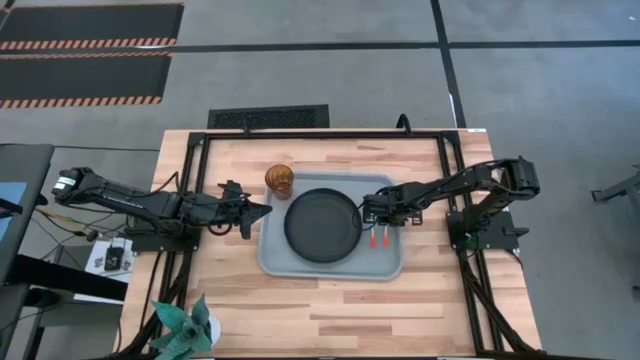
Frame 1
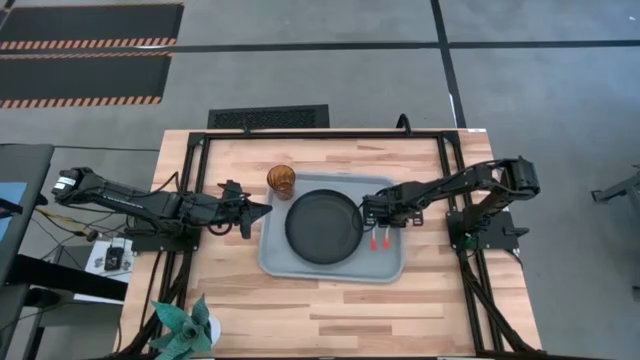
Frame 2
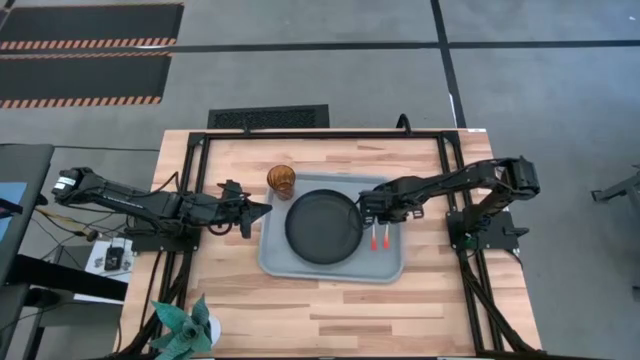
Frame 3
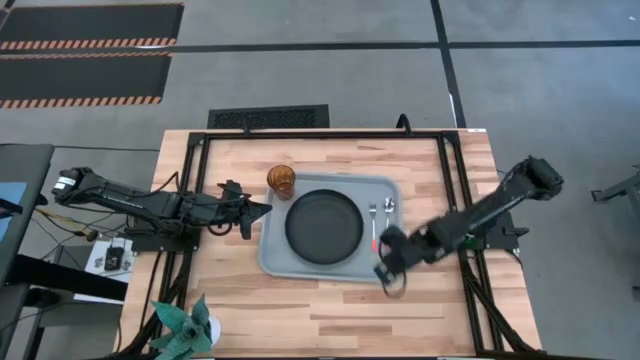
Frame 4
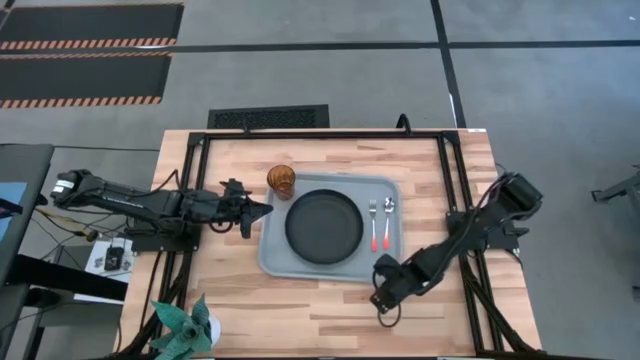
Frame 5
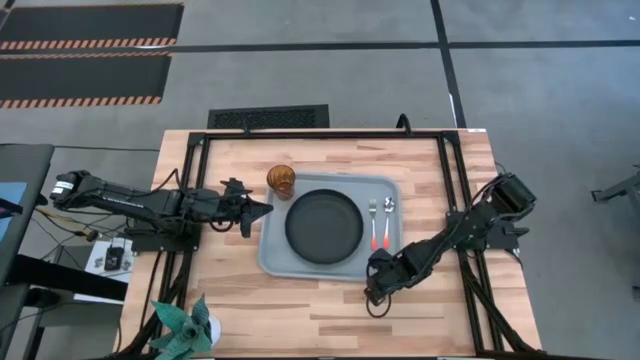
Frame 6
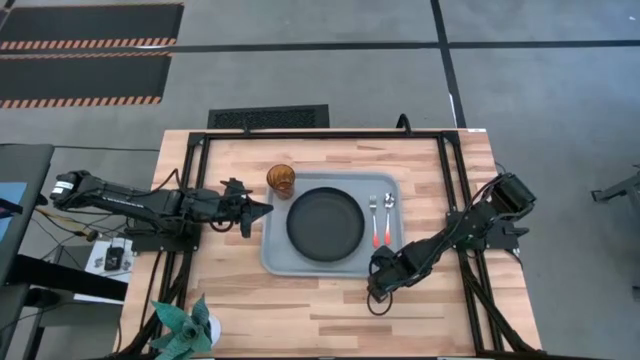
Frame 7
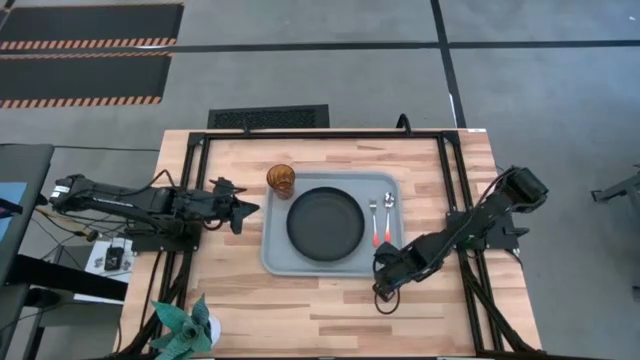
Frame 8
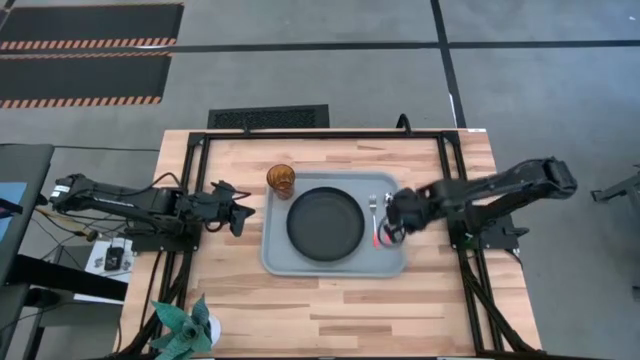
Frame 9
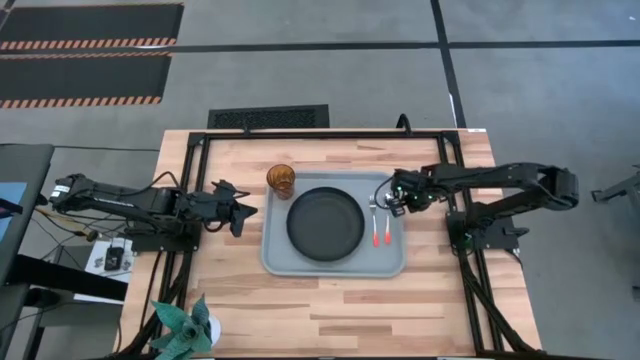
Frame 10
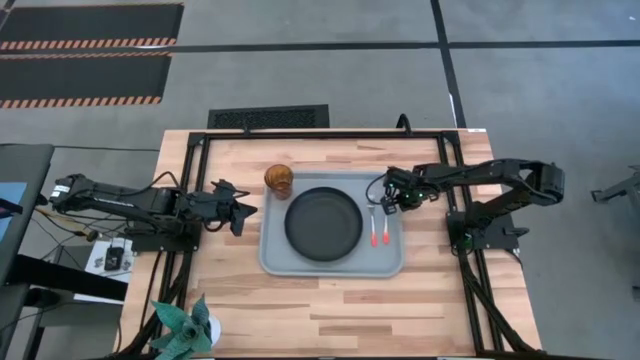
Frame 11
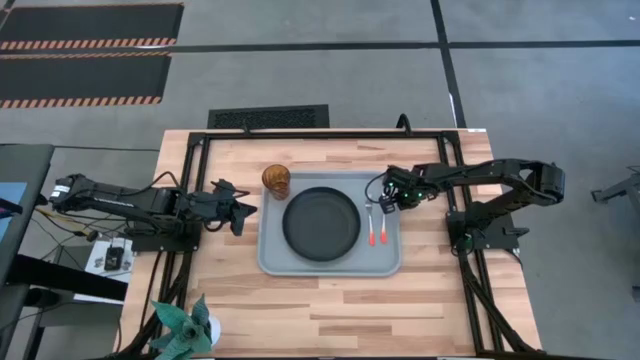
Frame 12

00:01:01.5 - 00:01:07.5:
Task: Pick and place plate/cup/fork/spoon on tray
Adjust the gray tray

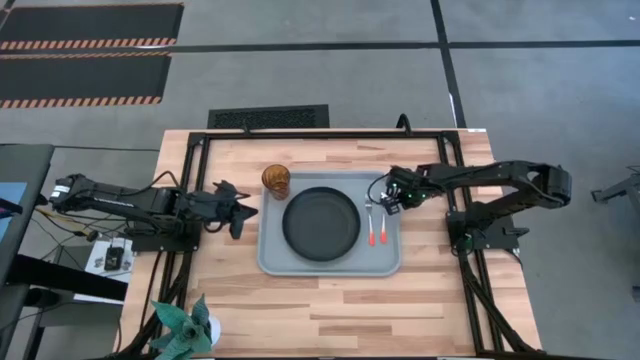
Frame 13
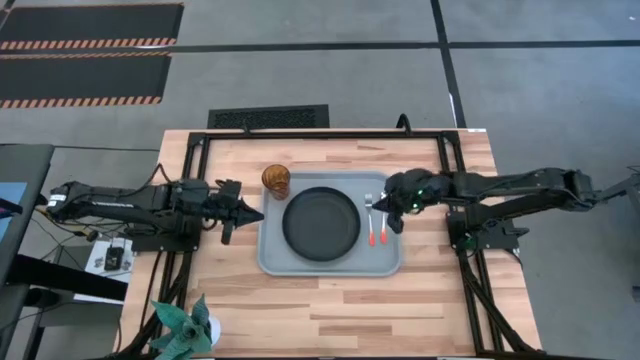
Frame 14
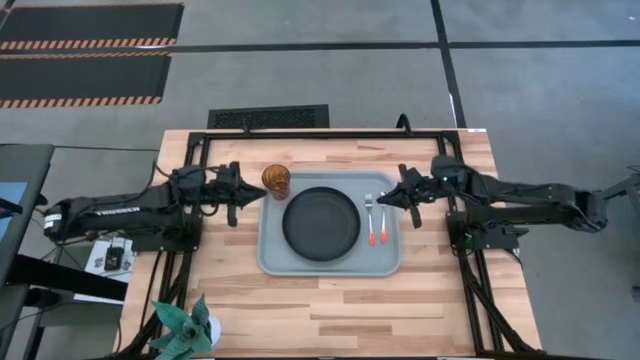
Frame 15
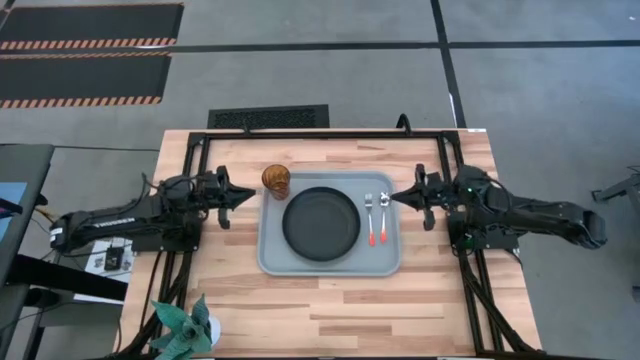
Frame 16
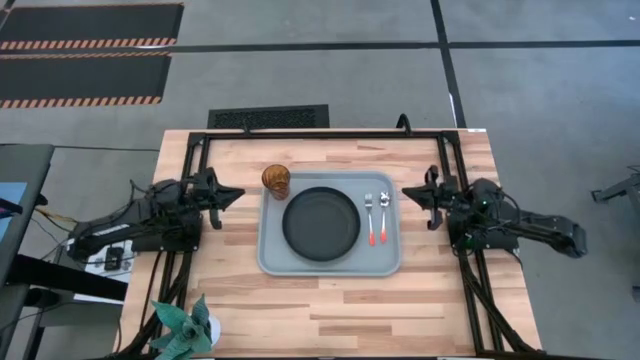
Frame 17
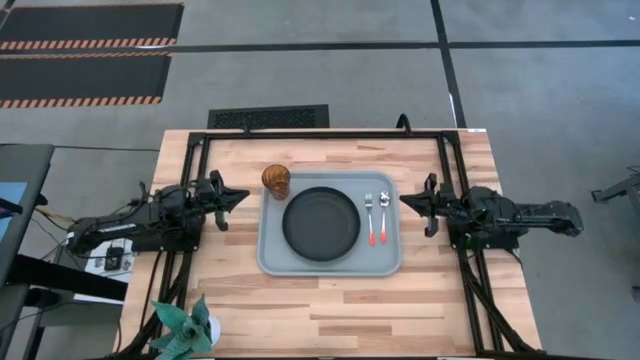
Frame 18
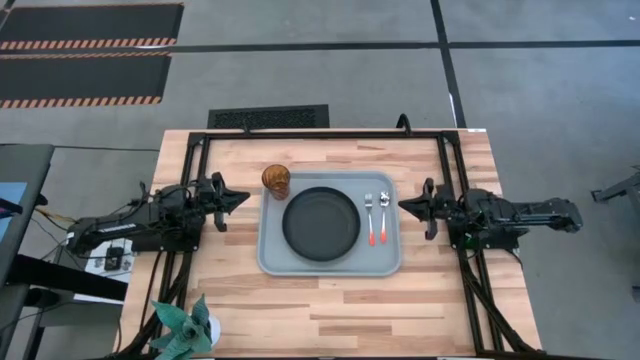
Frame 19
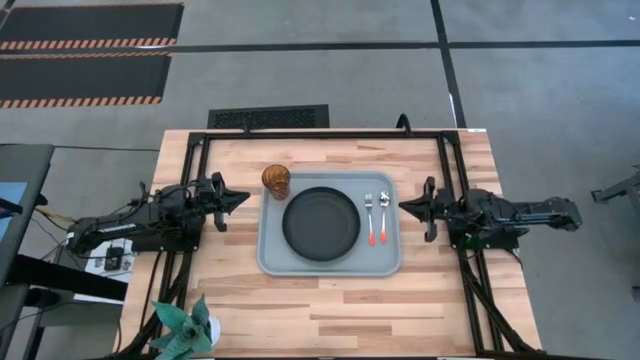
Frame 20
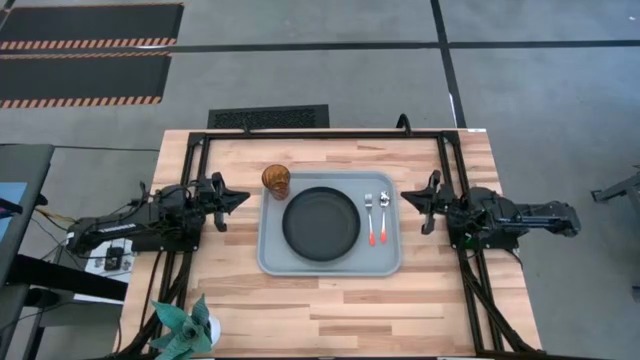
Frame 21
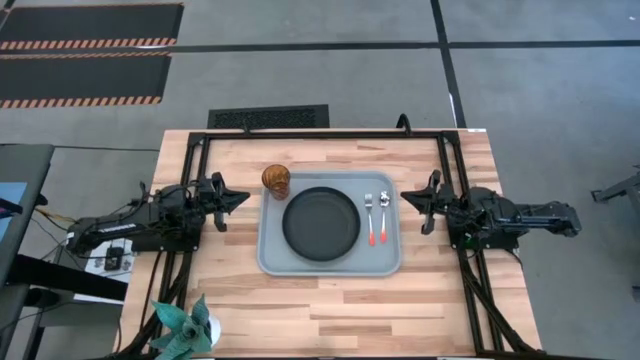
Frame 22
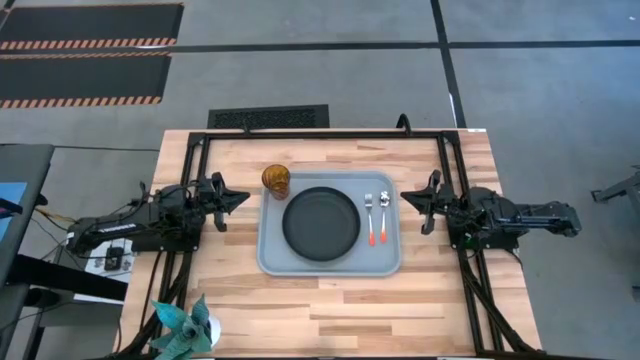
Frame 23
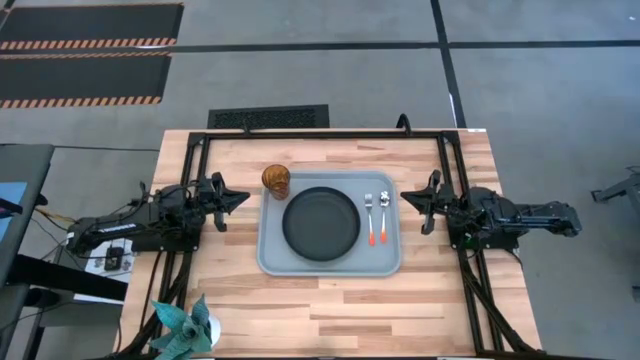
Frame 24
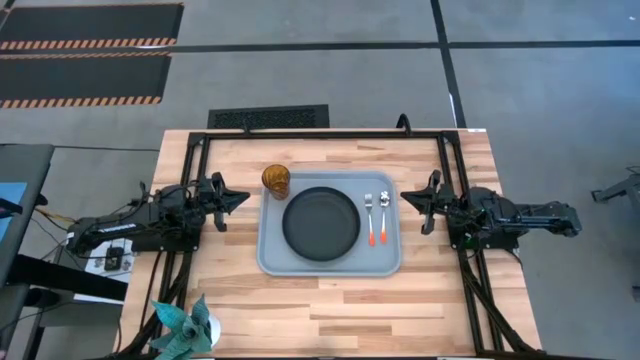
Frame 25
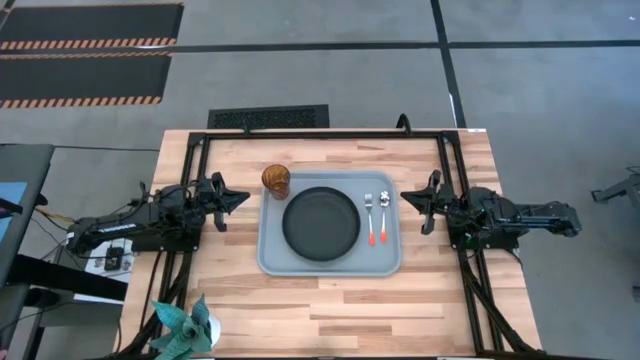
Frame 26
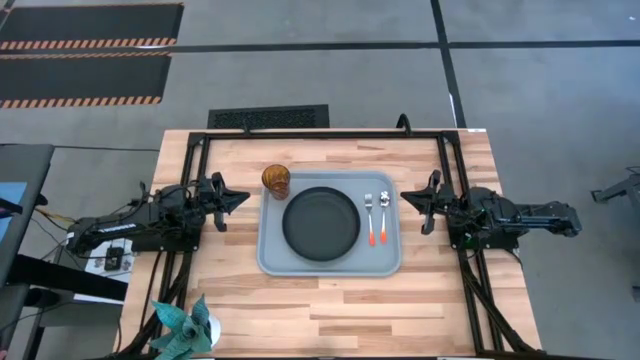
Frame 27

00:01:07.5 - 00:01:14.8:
Return to Home Position

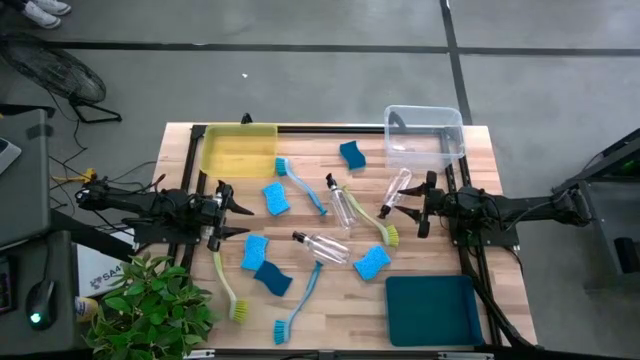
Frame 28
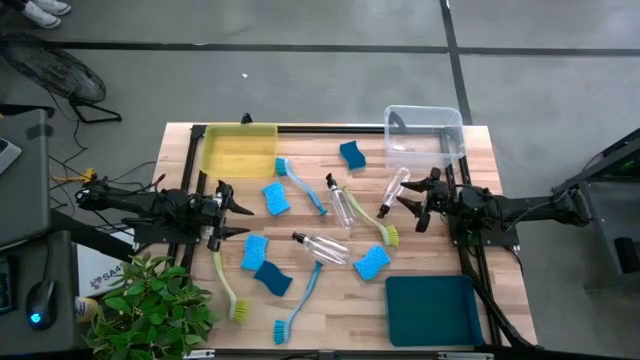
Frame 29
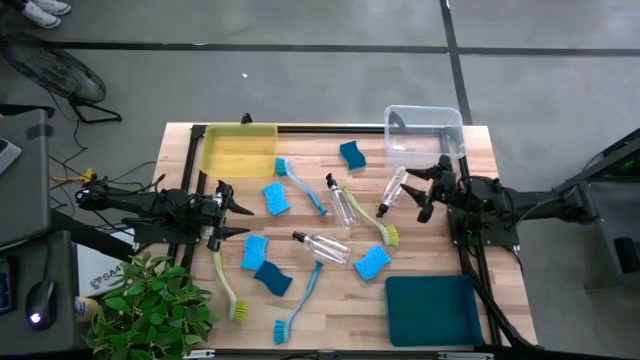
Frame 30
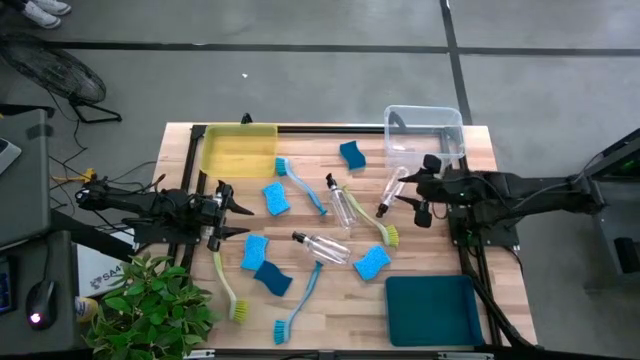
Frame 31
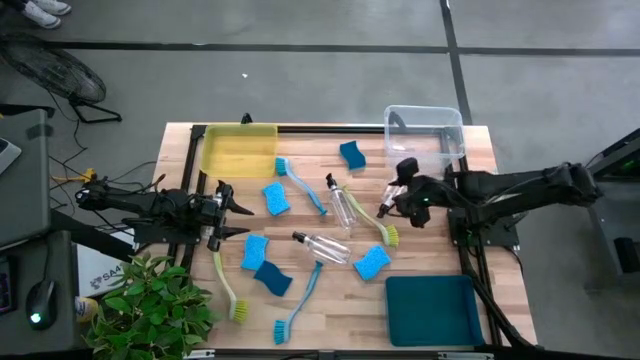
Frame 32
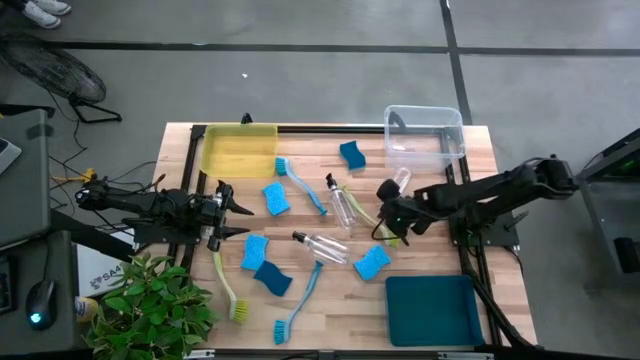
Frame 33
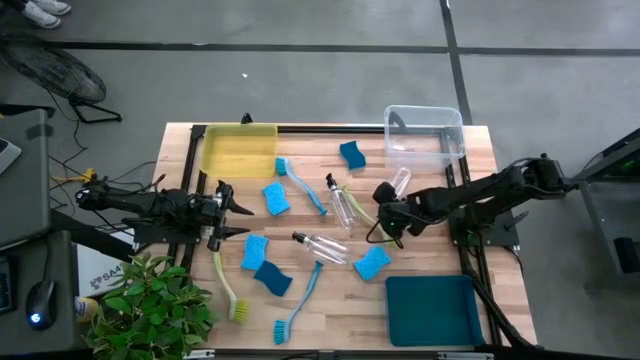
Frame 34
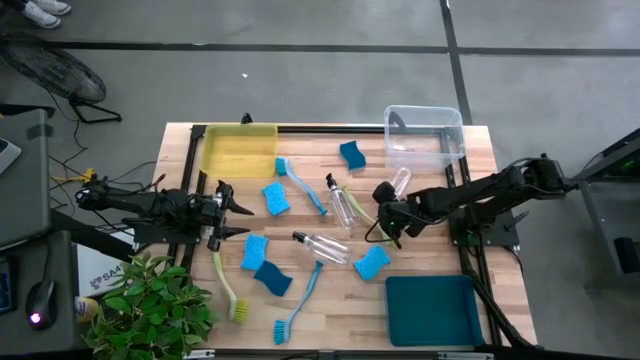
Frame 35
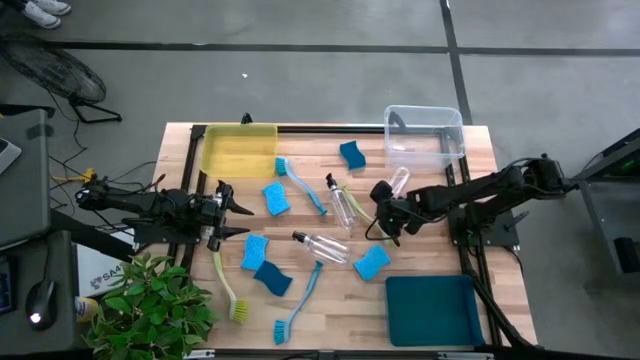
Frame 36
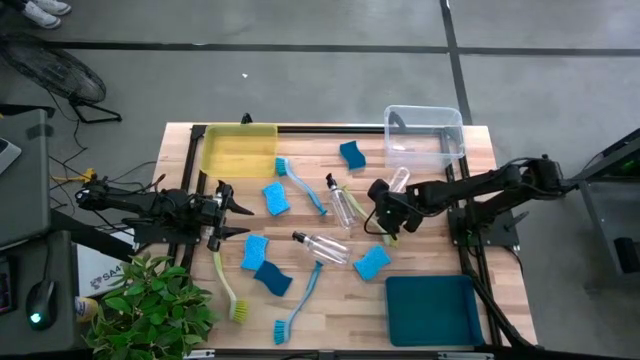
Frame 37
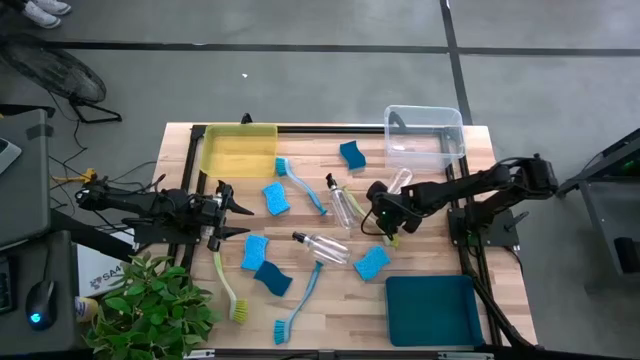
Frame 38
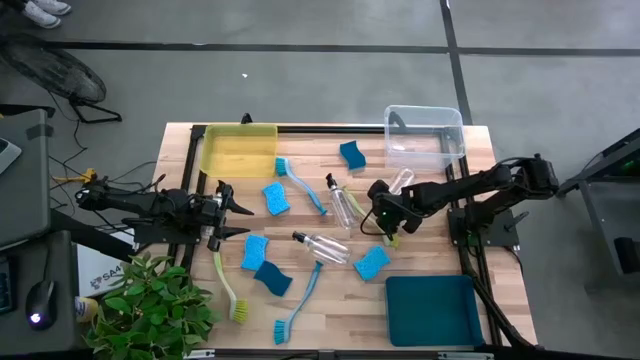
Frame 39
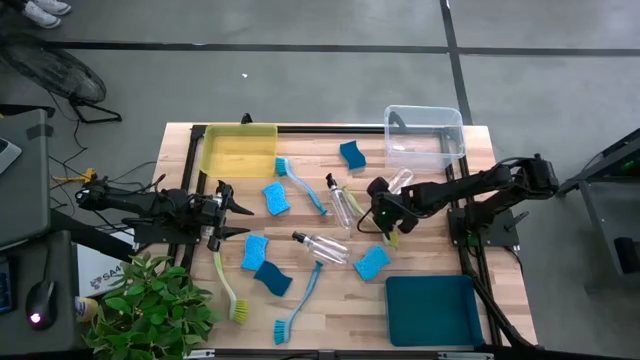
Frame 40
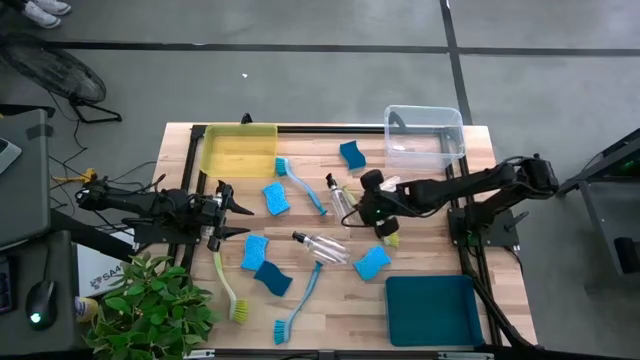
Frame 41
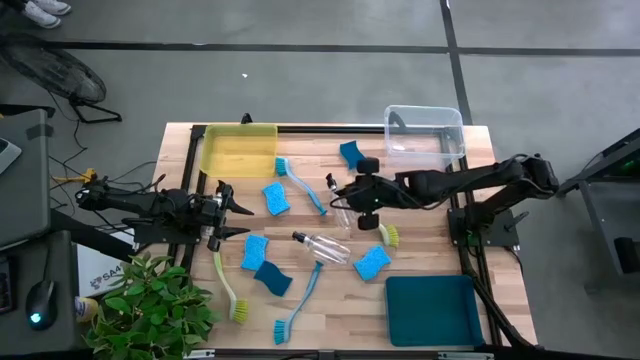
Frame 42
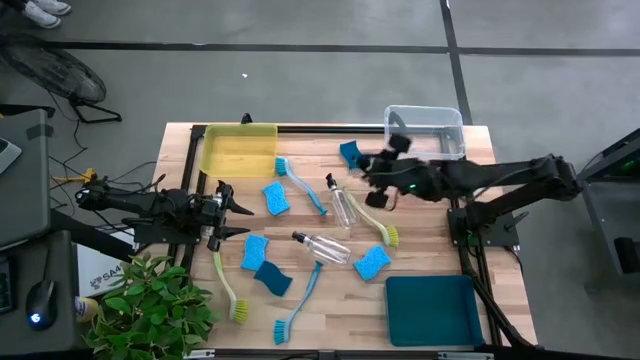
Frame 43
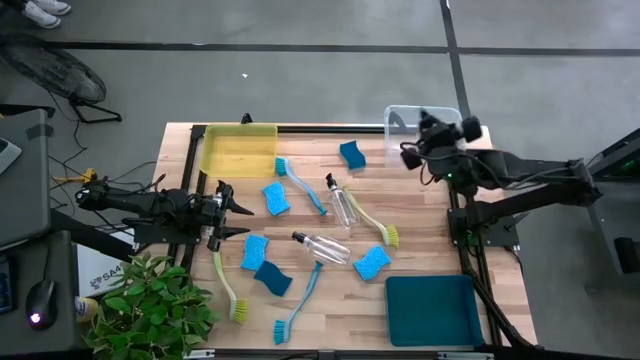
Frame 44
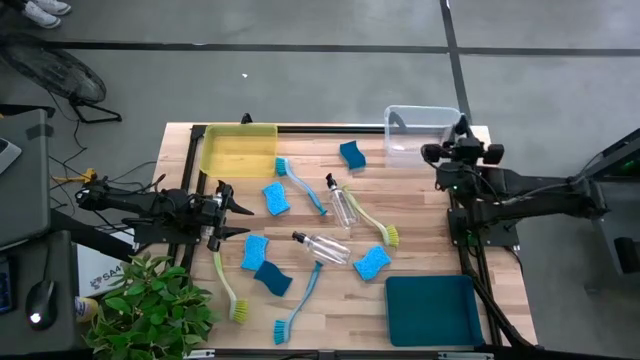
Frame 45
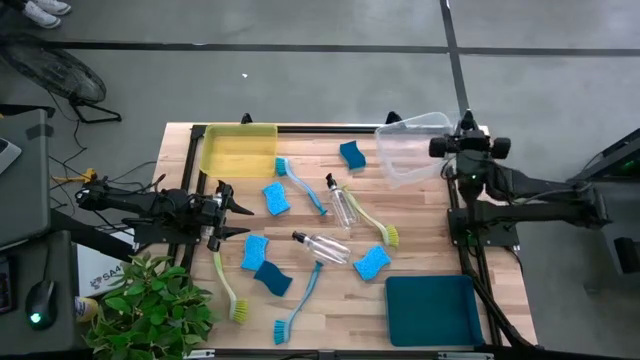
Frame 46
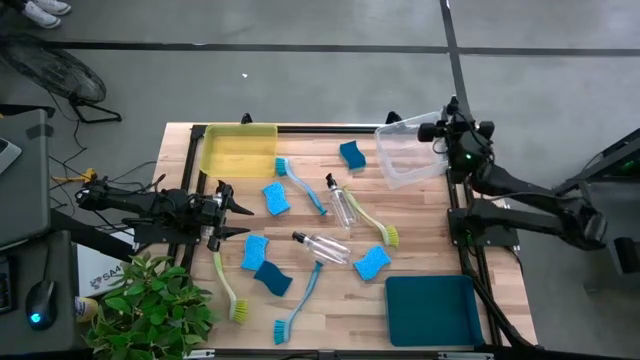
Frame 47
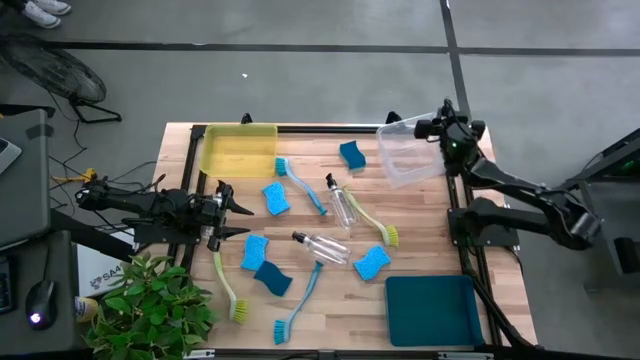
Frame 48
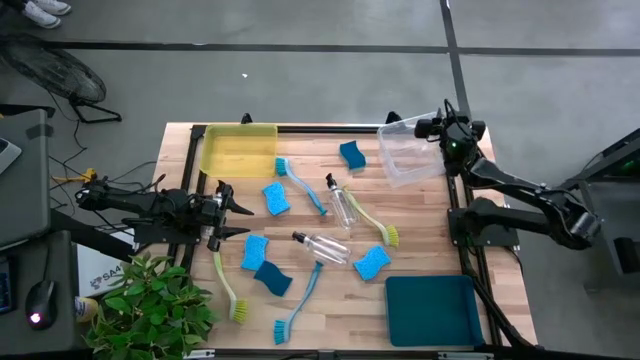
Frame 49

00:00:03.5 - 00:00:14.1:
Task: Pick & Place Kitchen Sink Supplies
Put the transparent soap dispenser into the transparent bin
